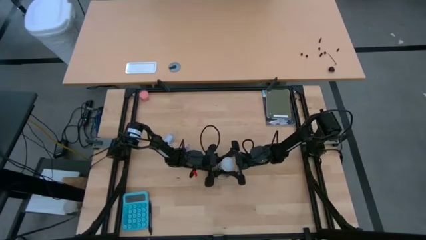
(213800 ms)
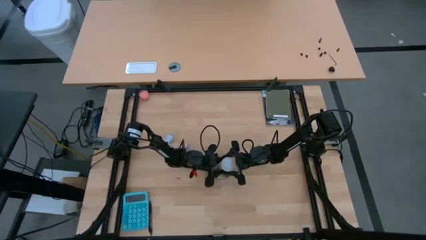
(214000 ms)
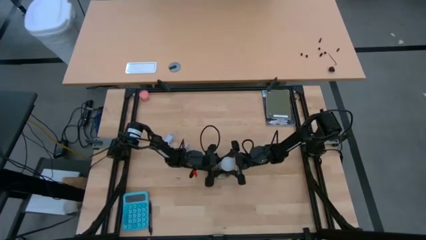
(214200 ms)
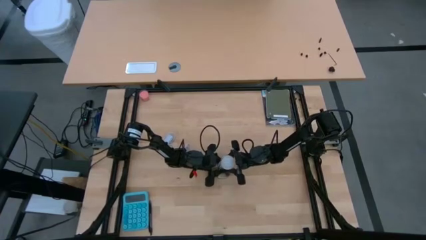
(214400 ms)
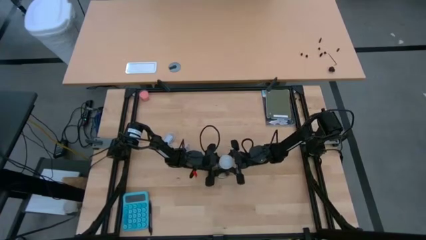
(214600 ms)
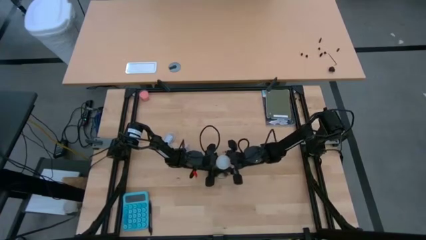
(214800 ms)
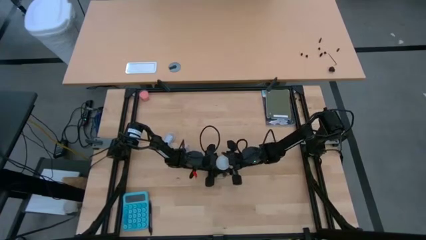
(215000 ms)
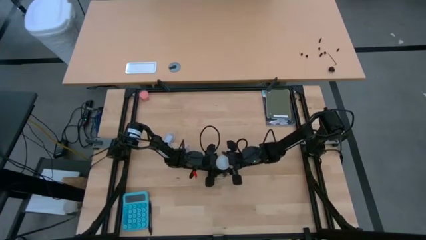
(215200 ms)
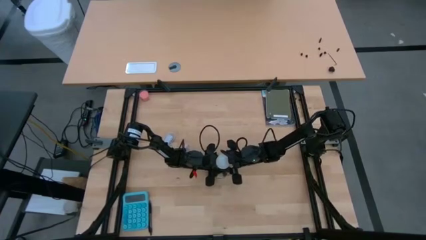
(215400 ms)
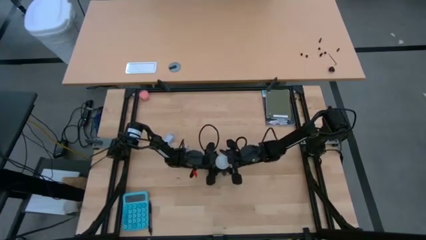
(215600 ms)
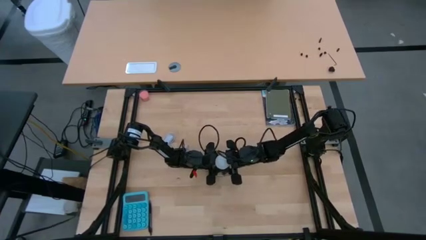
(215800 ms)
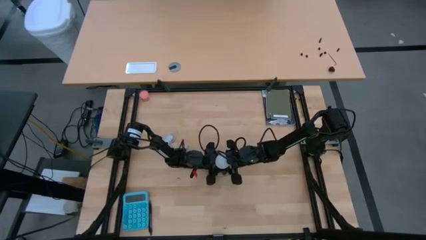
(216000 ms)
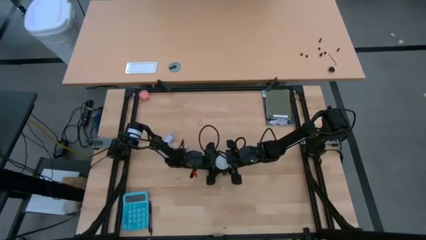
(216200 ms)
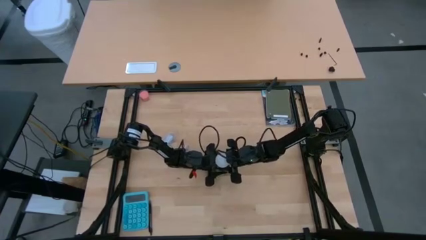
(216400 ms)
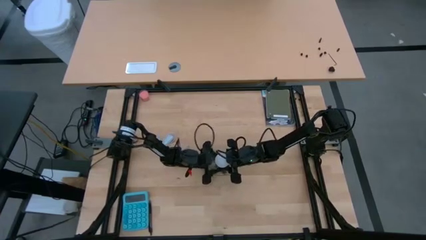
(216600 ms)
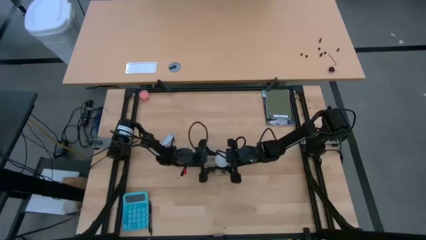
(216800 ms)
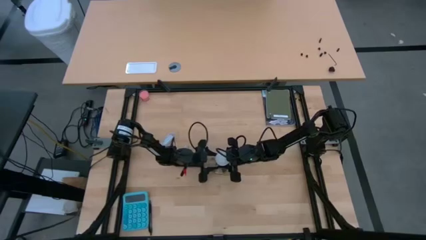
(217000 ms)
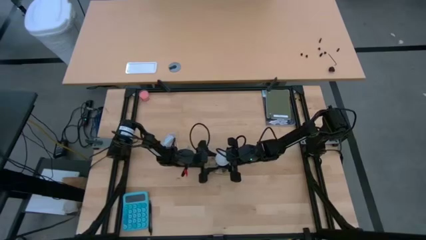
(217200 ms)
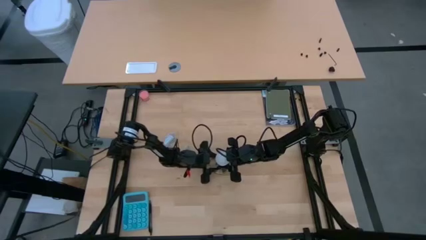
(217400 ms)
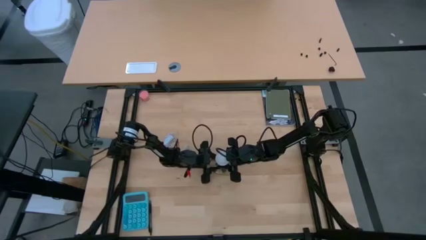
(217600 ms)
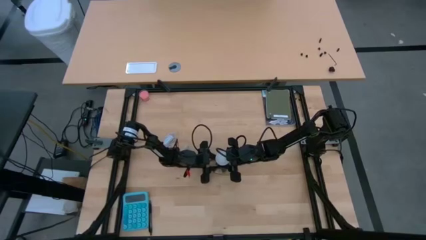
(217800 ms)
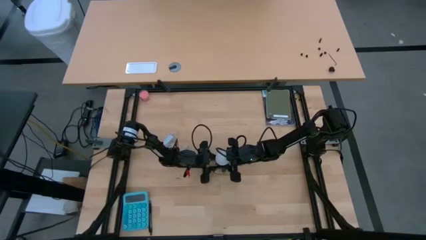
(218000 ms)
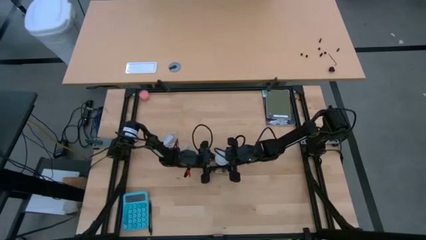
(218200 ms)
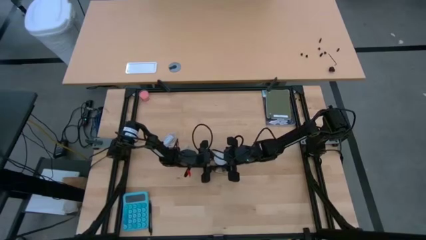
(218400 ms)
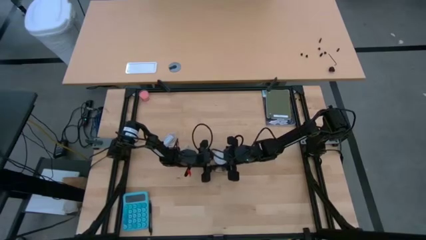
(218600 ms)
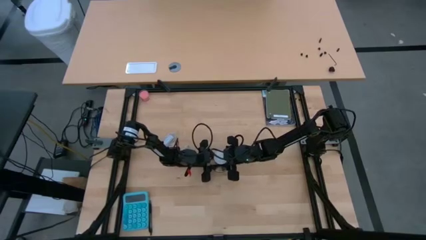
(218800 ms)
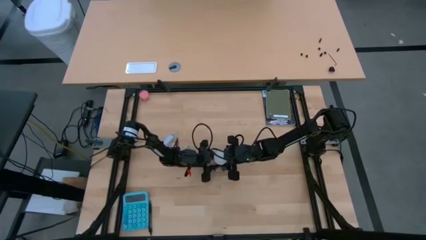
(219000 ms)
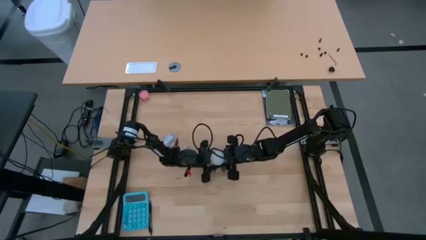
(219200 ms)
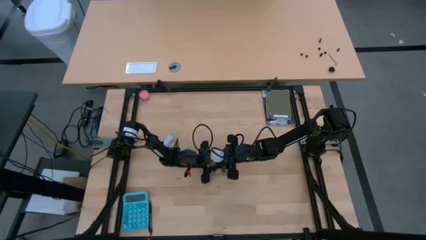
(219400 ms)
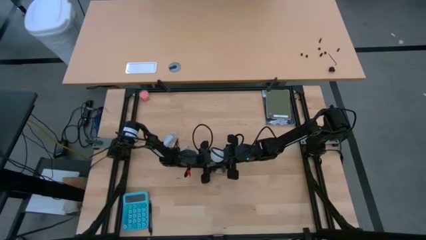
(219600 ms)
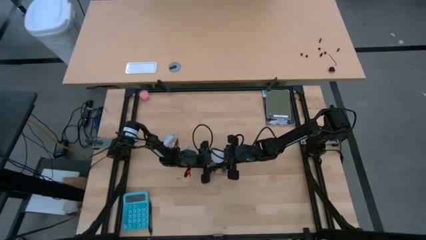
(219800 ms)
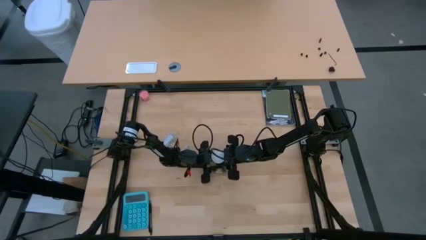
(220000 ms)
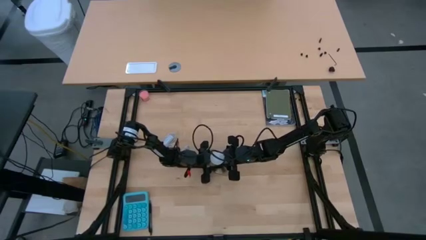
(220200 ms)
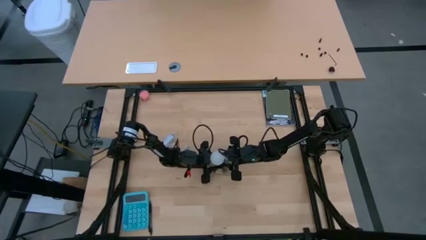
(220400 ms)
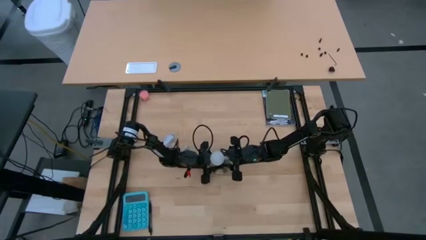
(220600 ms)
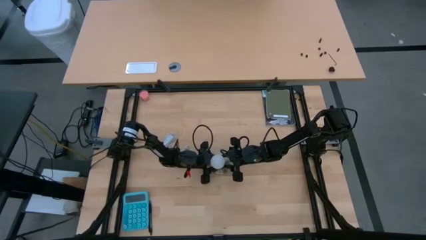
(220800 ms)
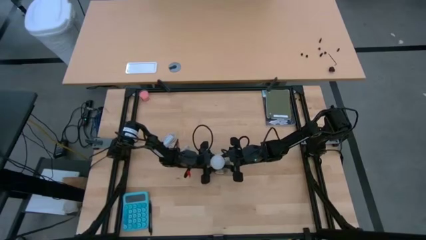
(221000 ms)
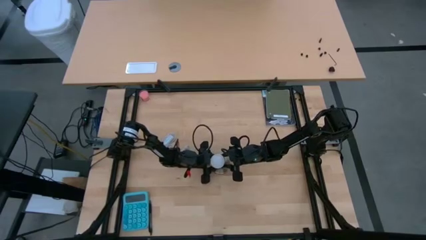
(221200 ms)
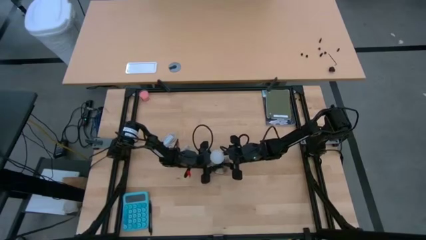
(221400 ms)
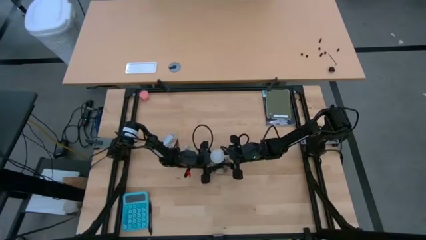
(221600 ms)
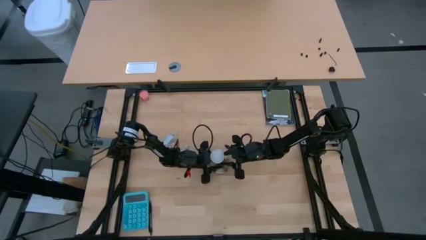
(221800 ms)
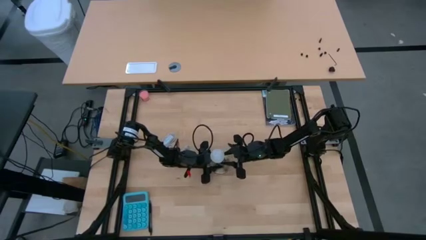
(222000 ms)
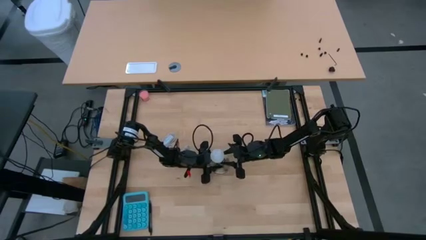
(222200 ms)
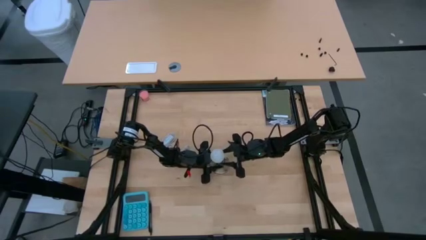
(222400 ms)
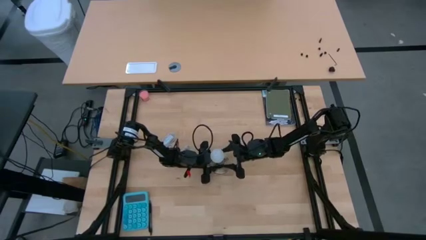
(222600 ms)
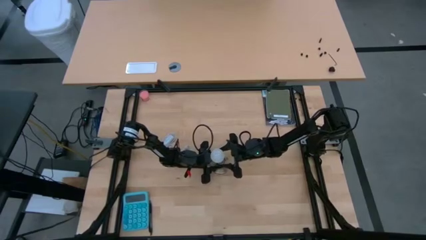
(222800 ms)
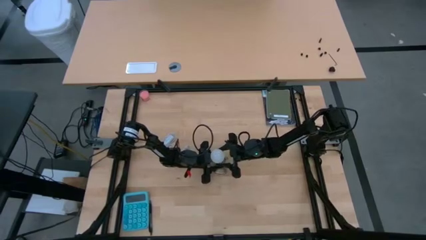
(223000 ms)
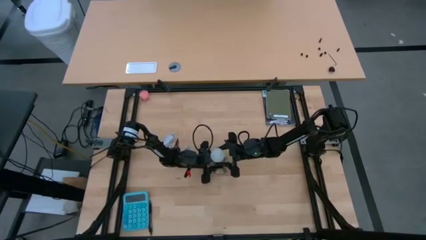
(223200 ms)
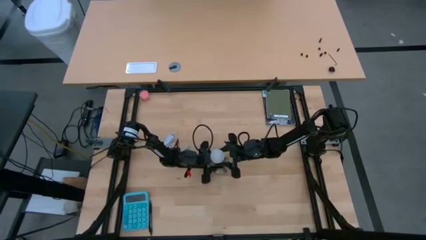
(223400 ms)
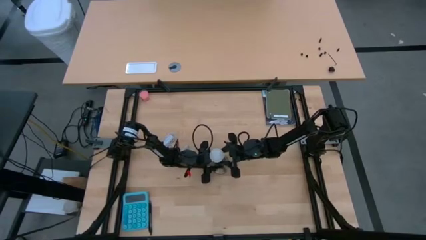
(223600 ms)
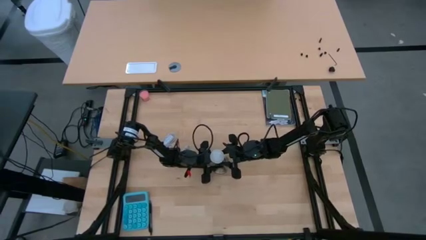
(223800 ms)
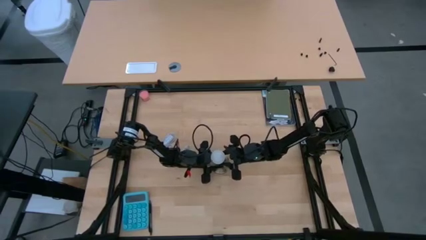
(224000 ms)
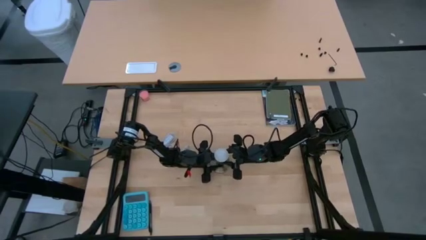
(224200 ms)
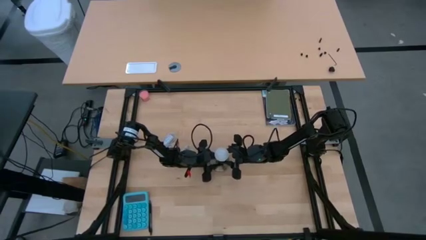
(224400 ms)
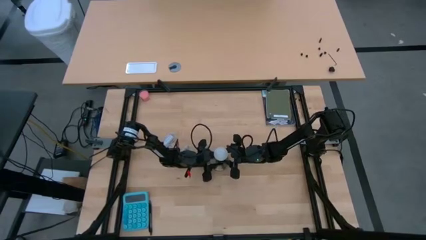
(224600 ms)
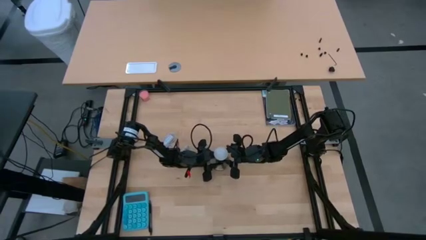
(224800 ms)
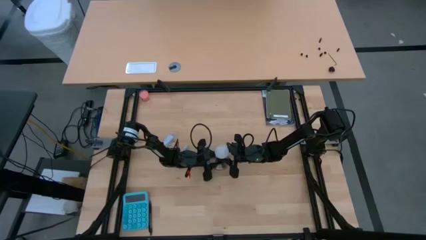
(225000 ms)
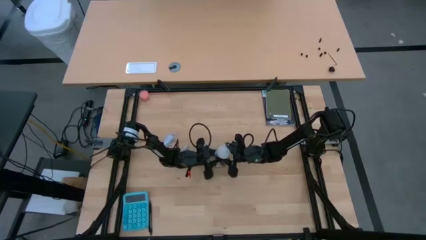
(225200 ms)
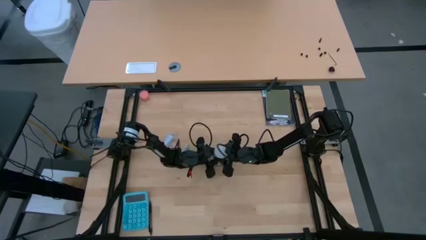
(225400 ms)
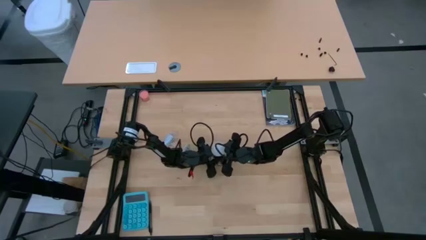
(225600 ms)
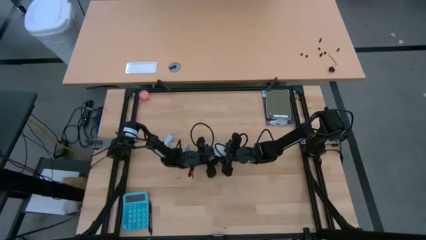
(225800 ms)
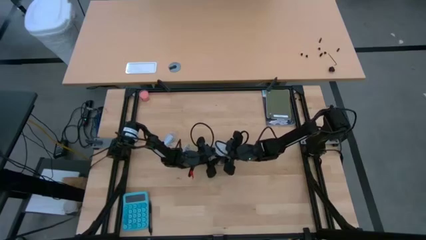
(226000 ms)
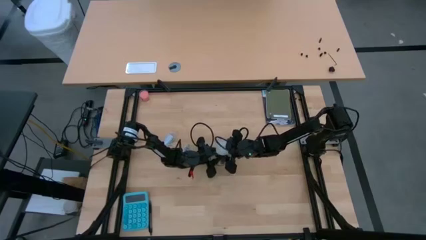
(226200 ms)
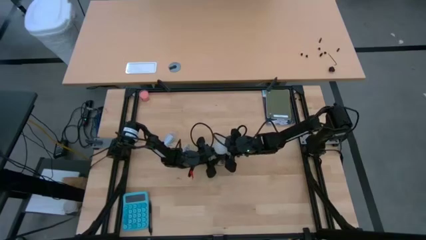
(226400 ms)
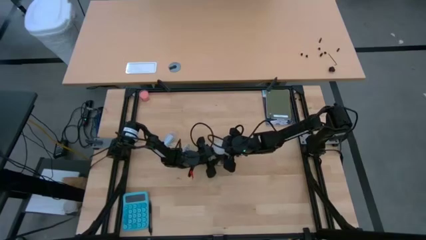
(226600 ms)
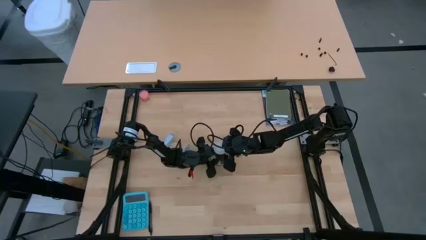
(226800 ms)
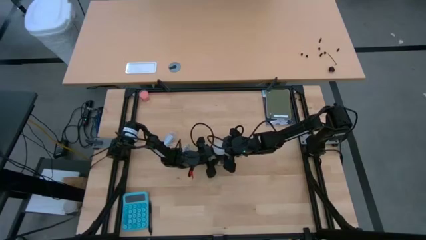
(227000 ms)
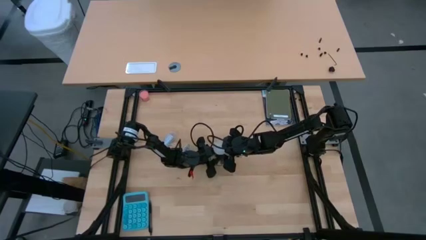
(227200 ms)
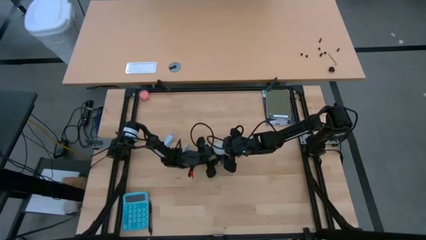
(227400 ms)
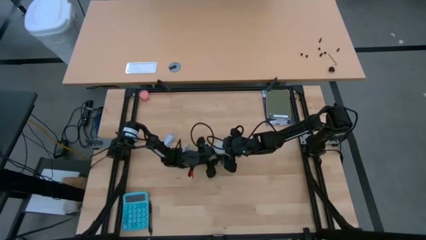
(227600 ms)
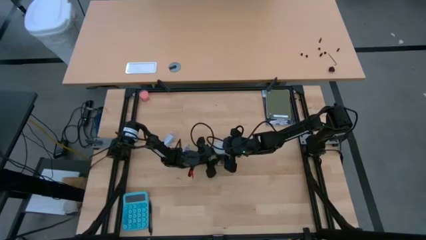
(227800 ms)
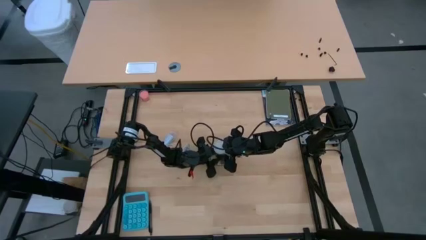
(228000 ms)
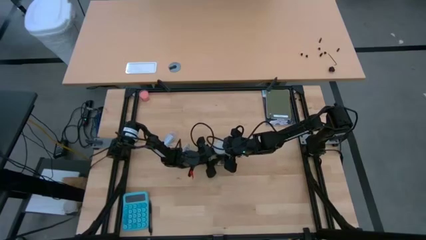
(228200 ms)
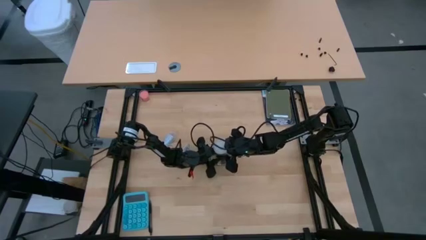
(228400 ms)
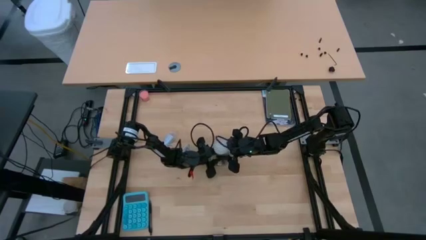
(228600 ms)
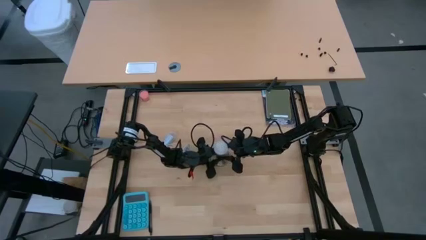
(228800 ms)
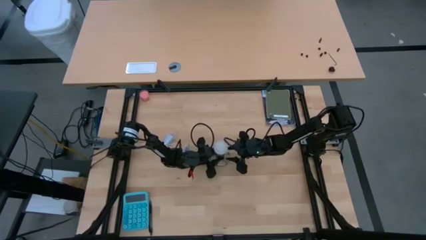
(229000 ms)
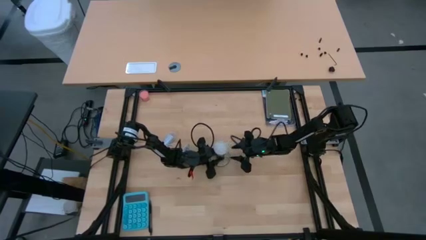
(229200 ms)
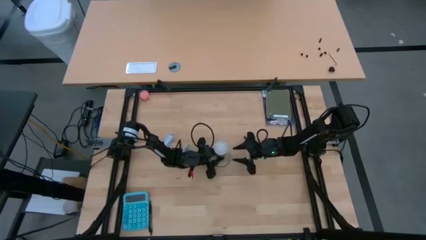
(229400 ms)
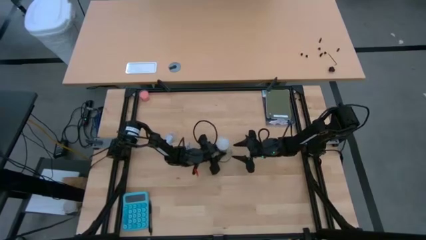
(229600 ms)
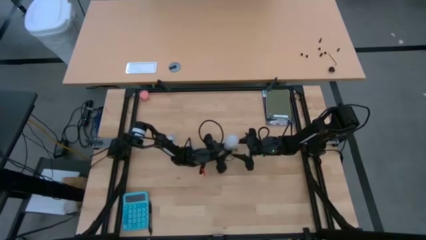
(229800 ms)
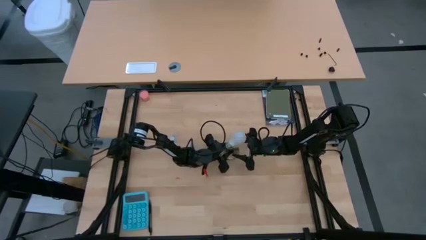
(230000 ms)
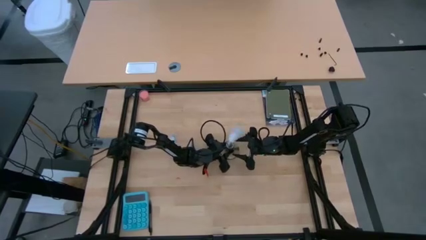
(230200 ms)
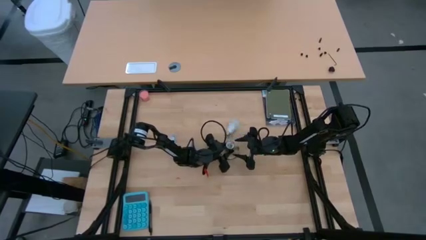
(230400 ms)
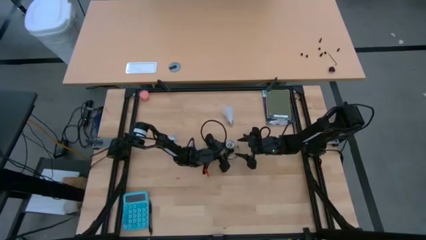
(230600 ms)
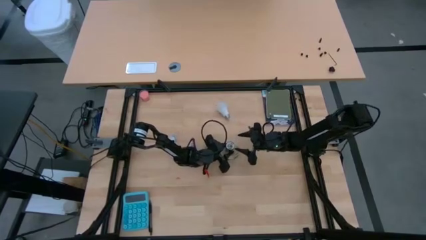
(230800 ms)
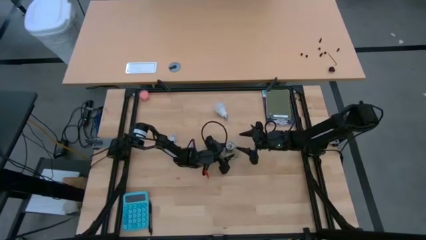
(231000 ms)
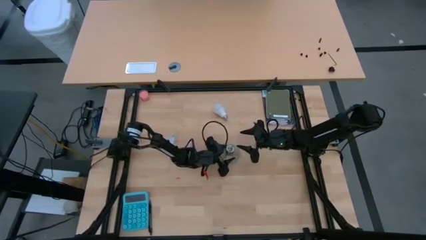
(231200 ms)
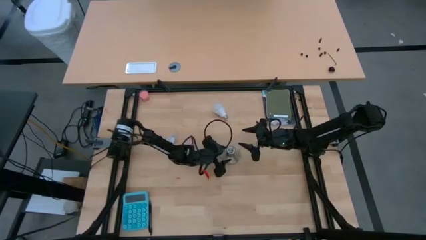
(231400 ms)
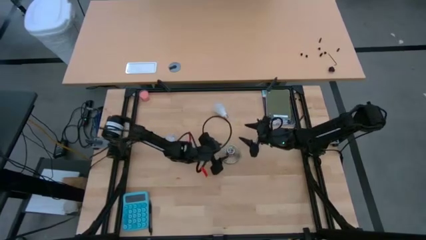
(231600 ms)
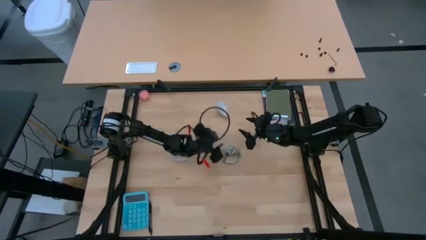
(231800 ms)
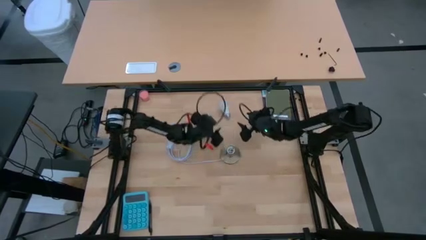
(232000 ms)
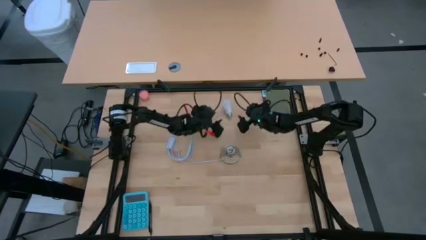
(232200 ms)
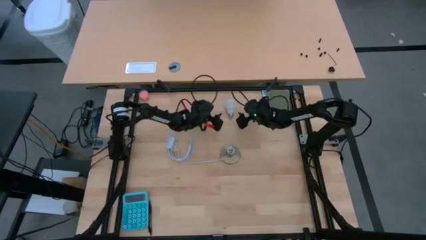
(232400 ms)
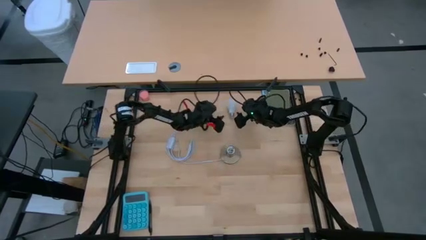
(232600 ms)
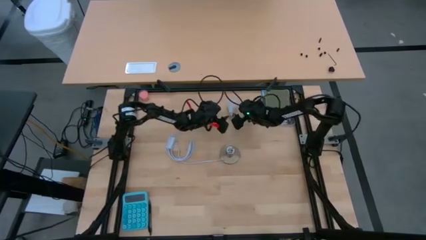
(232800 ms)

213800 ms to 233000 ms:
Task: Screw lightbulb
Insert the lightbulb into the lamp holder
